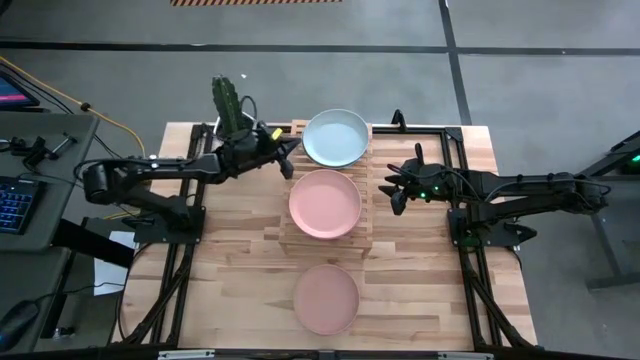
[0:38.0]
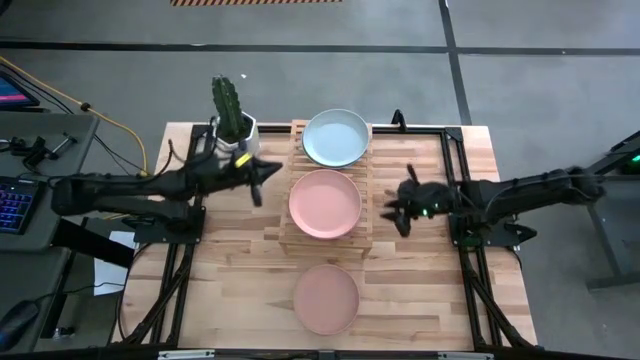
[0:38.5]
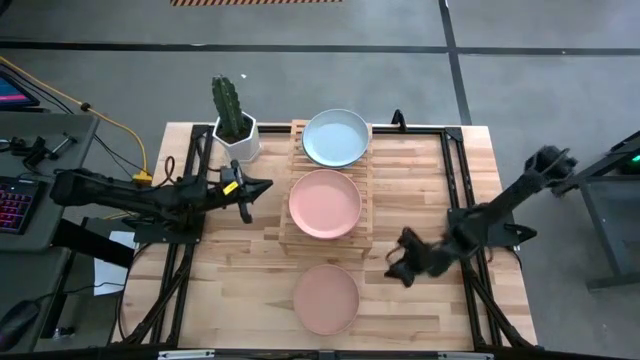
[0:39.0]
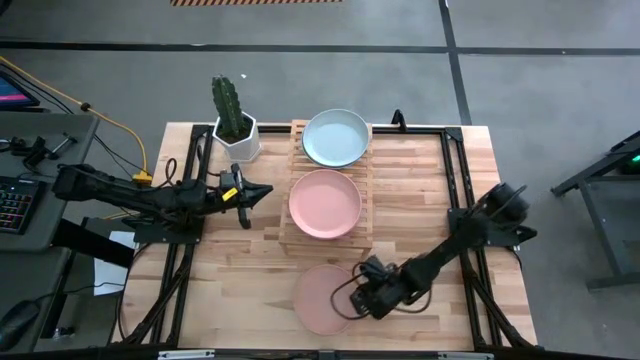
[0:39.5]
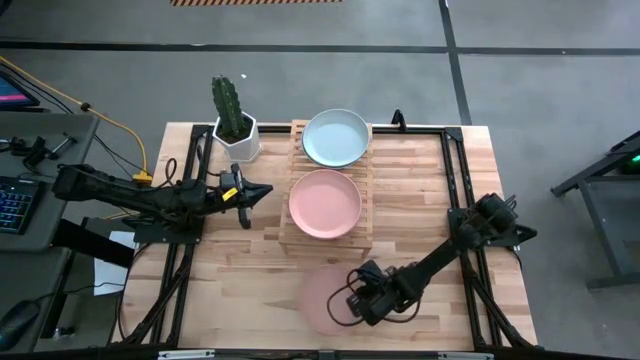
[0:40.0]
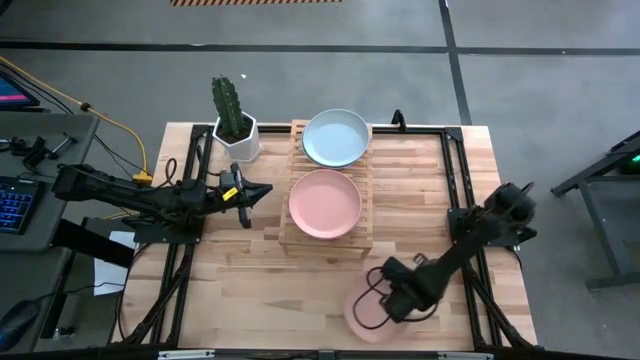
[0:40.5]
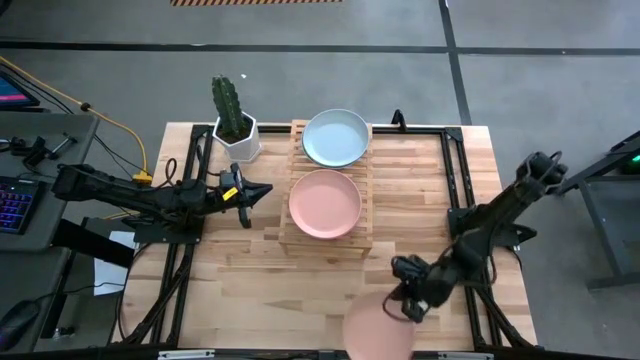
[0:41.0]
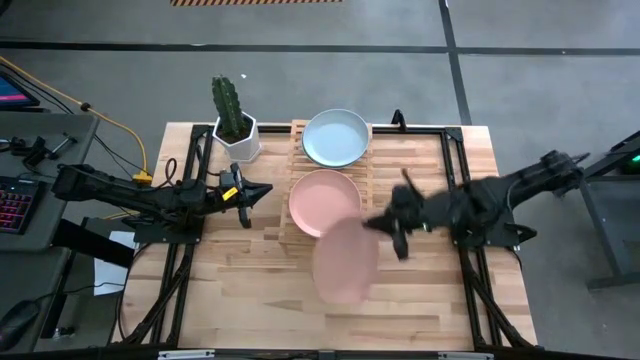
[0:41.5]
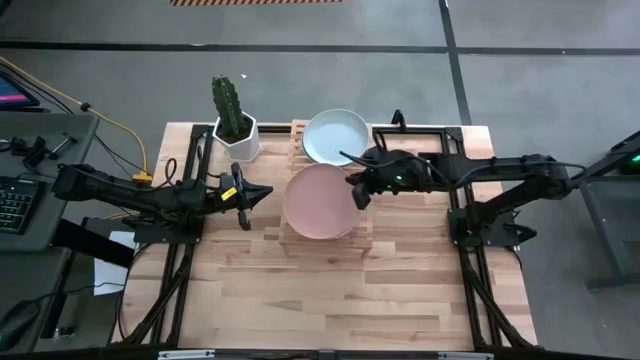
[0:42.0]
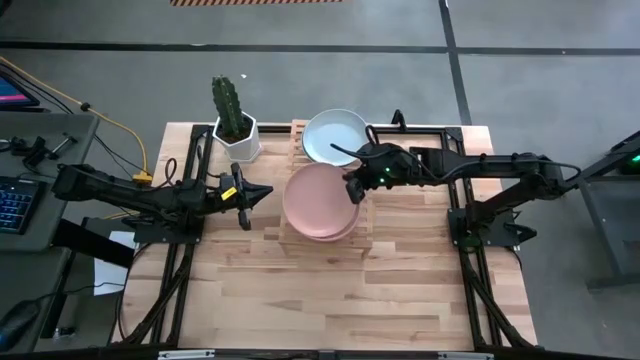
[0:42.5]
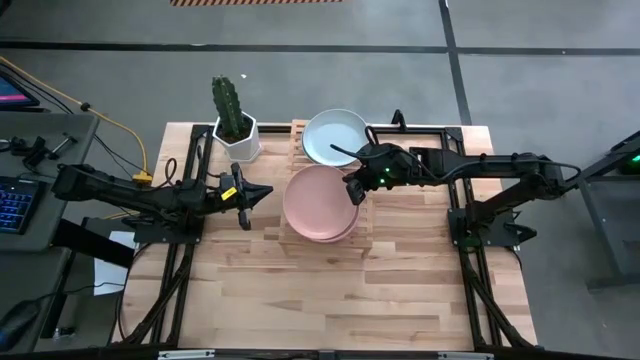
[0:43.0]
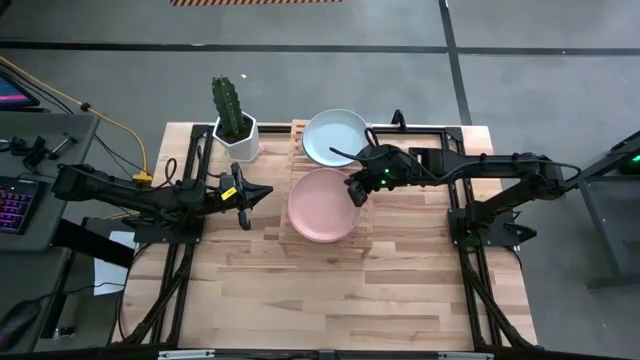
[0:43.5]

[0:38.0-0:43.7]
Task: Place and stack plates onto a shelf
Stack the light brown plate on the brown plate on the shelf

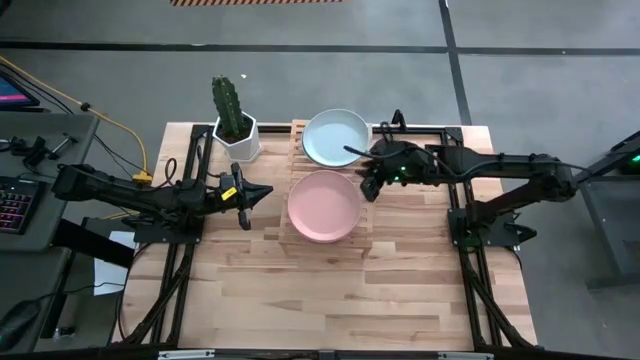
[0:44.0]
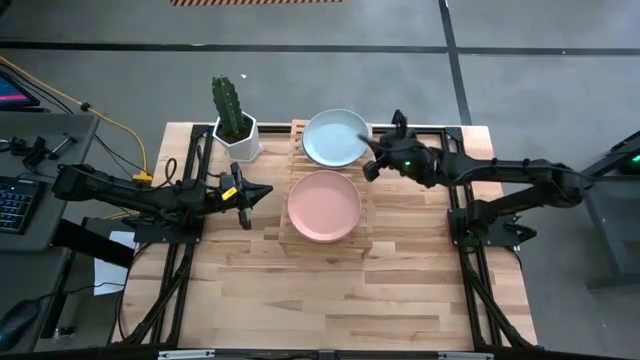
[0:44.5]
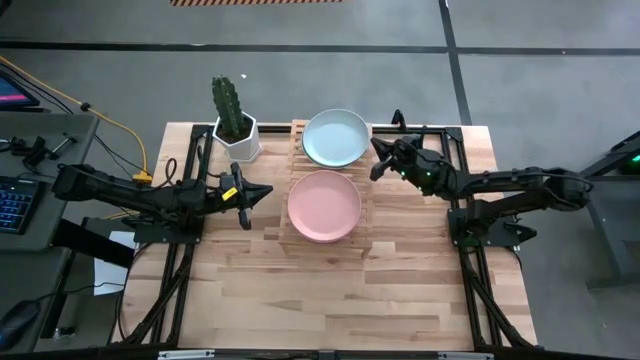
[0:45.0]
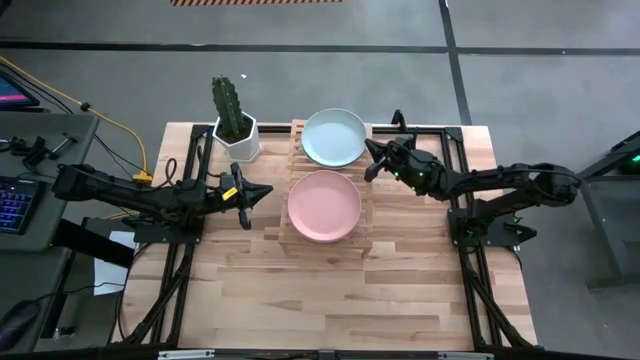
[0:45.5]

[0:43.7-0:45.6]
Adjust the gray plate on the shelf

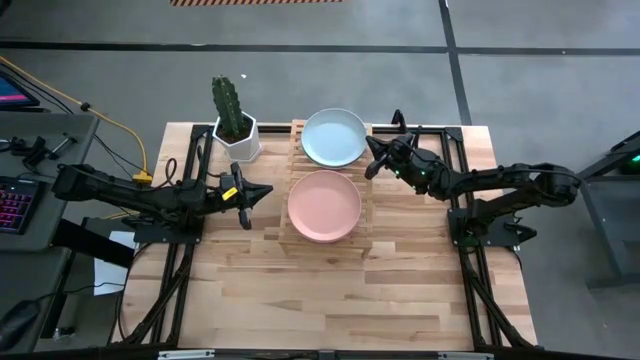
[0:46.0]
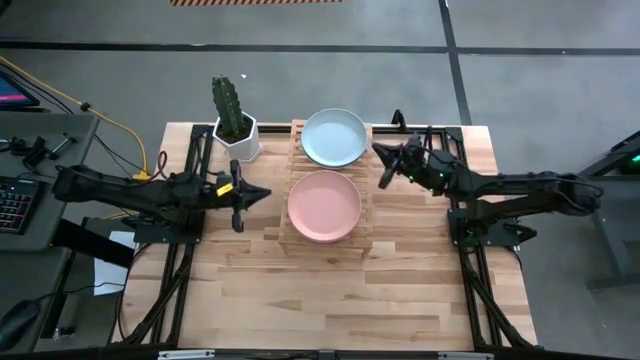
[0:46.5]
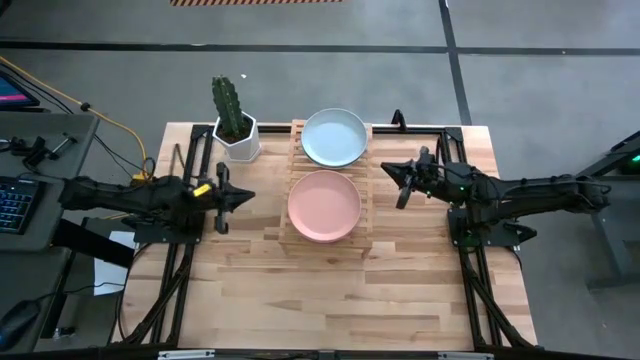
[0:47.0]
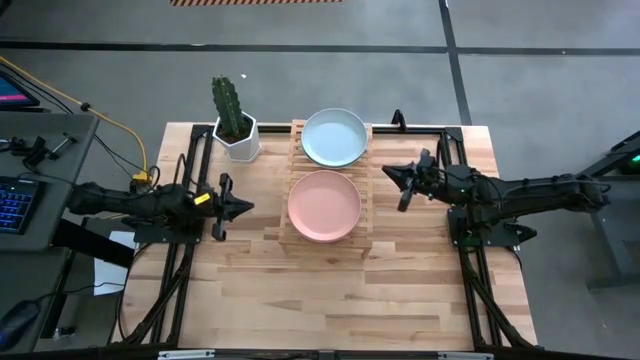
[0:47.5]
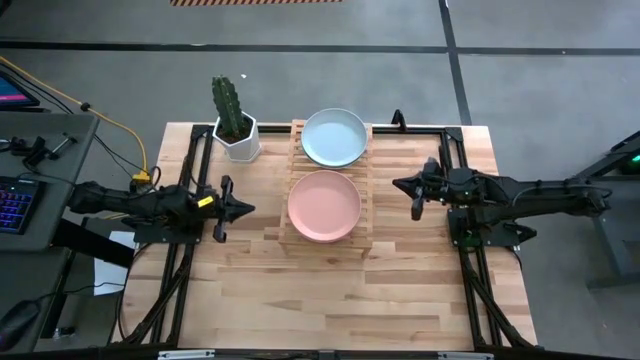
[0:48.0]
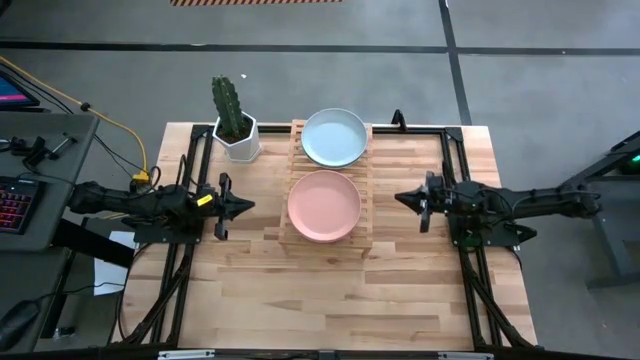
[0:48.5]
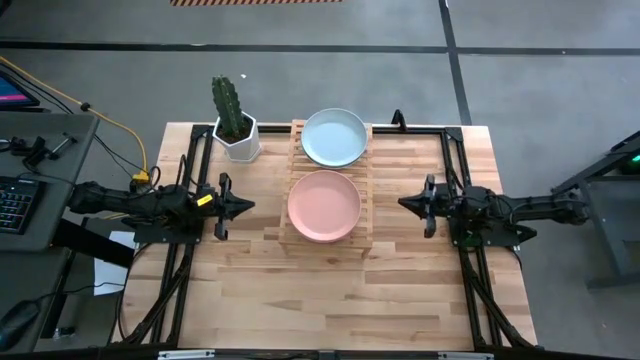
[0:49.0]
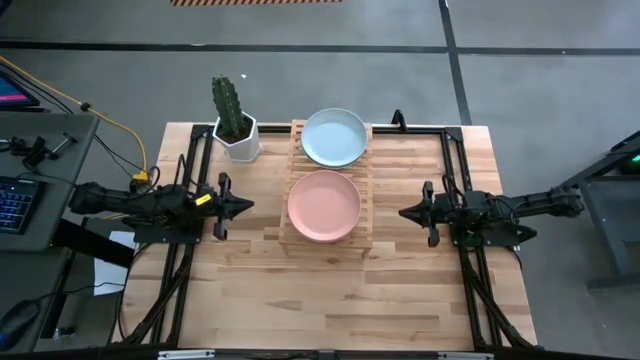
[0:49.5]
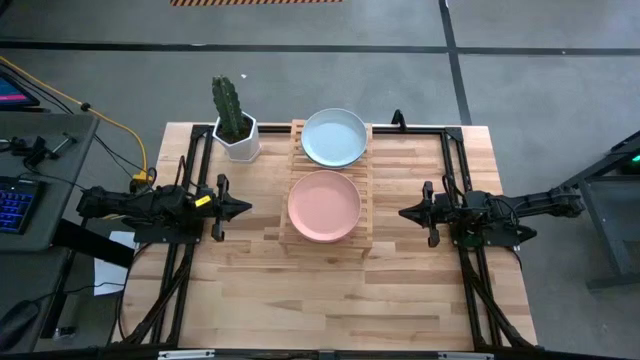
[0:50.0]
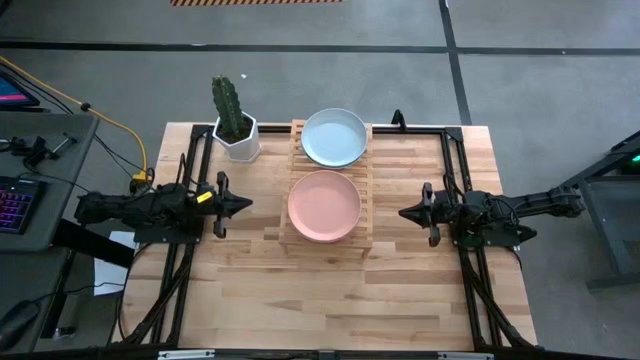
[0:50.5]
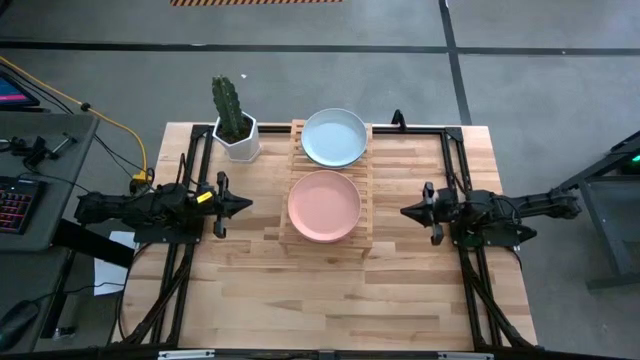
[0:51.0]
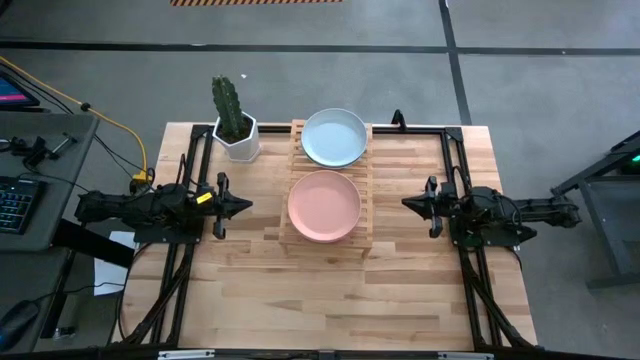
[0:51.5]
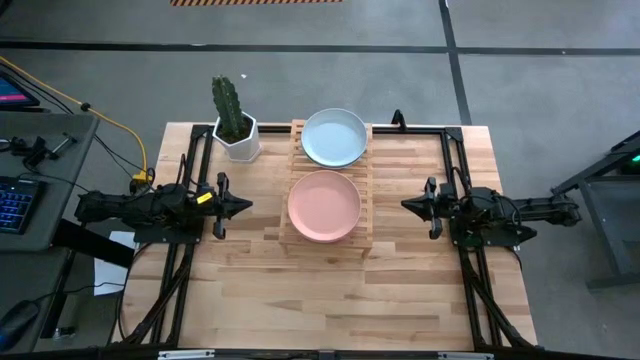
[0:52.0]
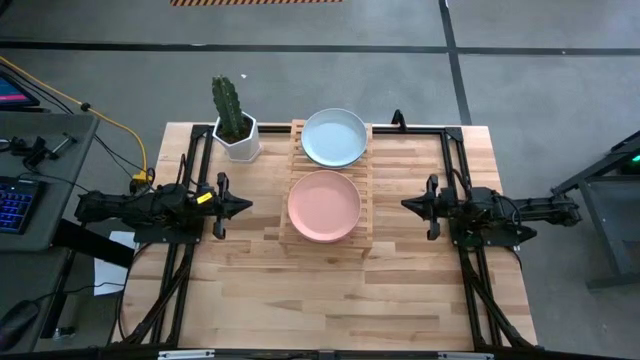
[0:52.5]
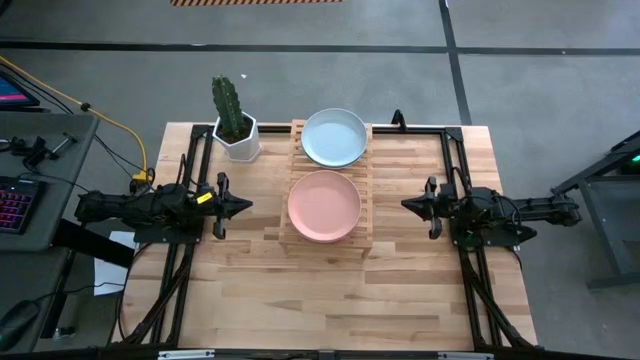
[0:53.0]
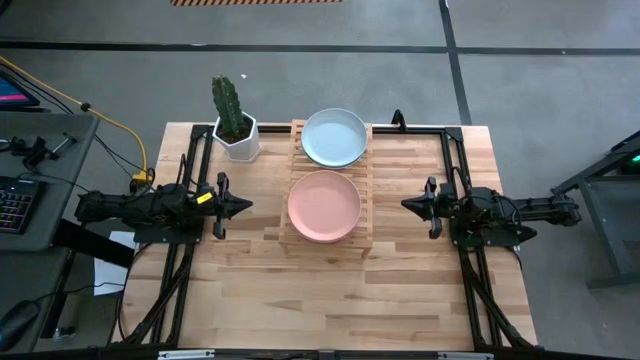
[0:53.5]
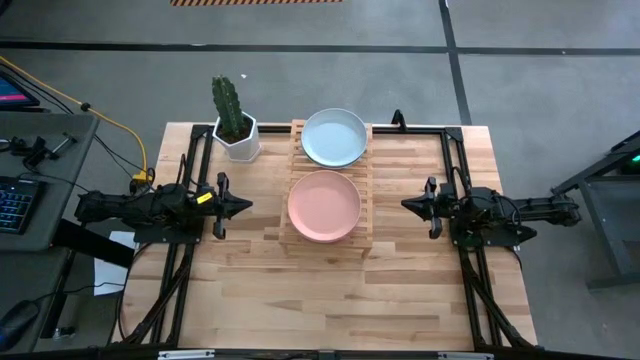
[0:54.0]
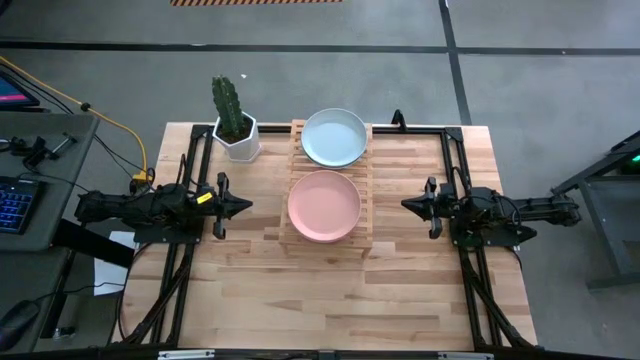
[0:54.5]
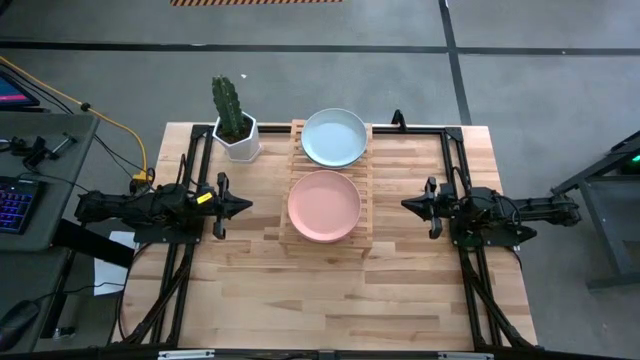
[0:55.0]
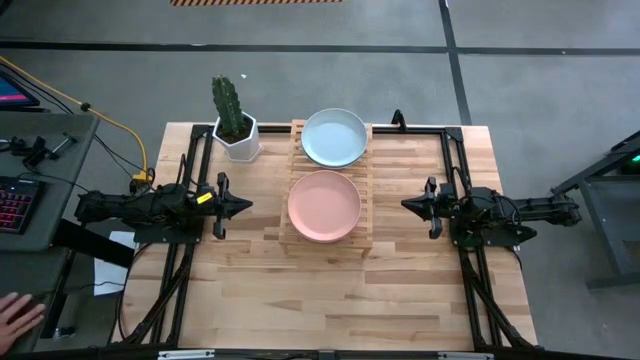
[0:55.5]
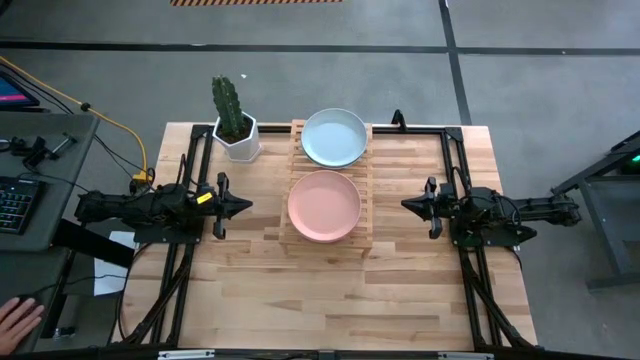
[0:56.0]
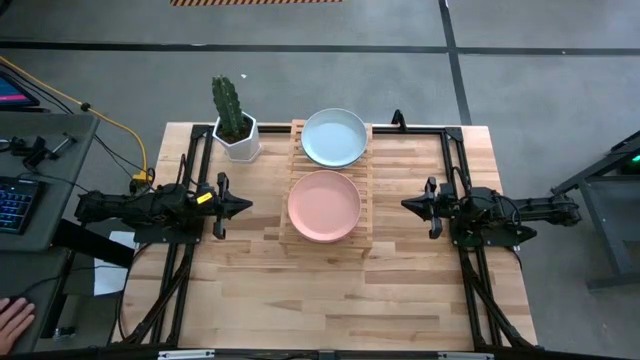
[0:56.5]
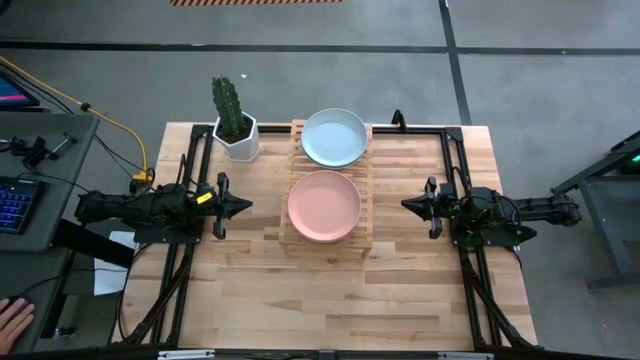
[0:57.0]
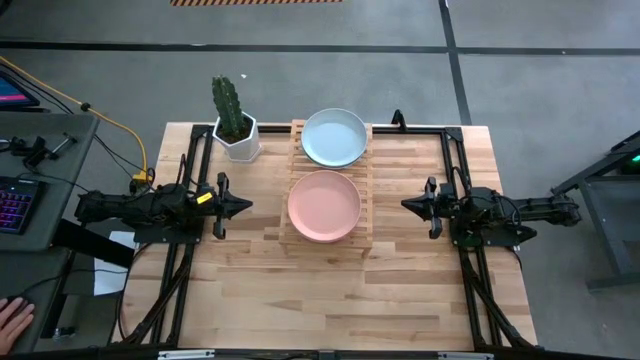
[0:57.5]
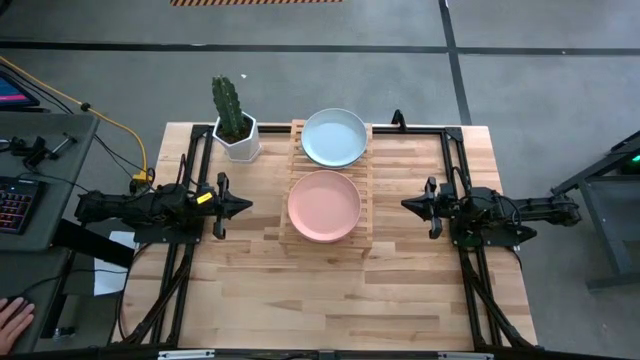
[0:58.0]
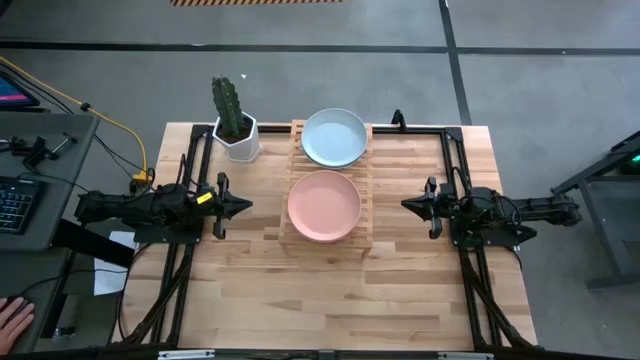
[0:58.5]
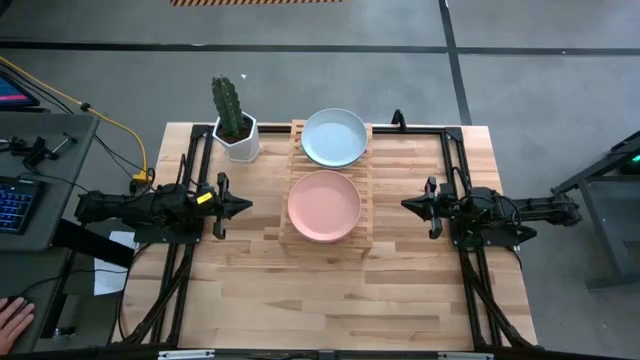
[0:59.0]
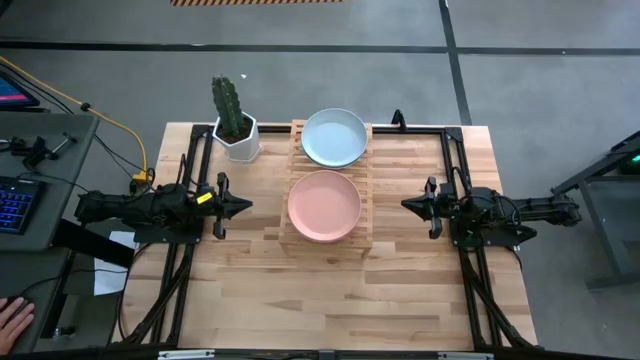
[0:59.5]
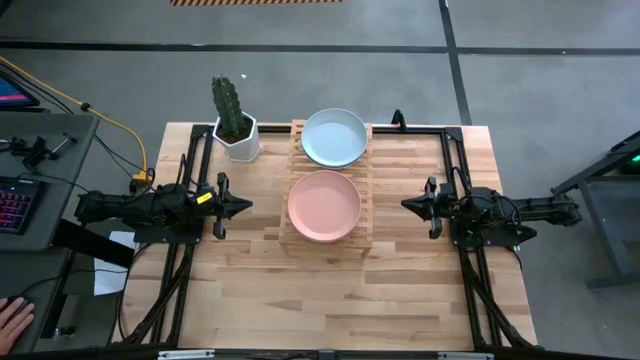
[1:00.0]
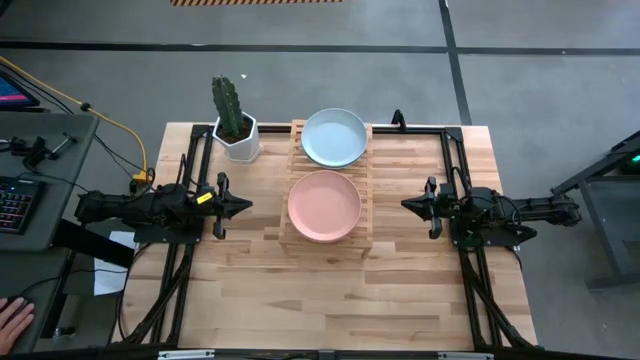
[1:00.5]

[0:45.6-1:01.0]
Return to Home Position
